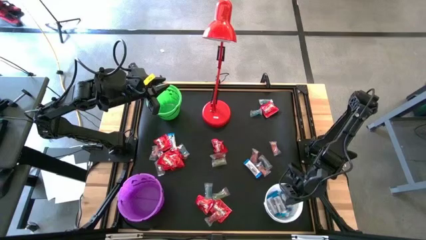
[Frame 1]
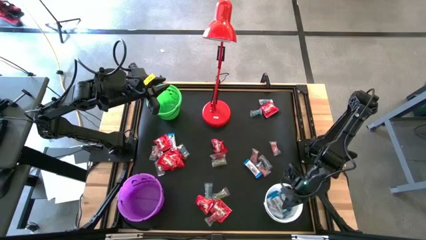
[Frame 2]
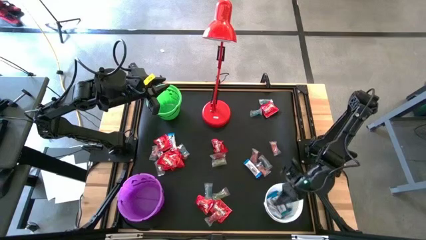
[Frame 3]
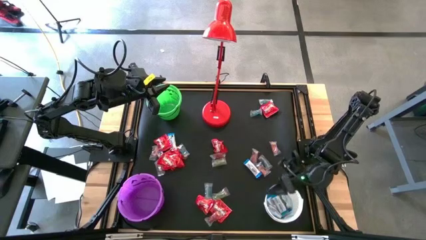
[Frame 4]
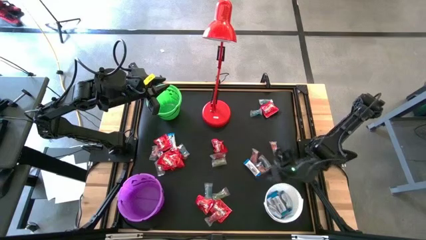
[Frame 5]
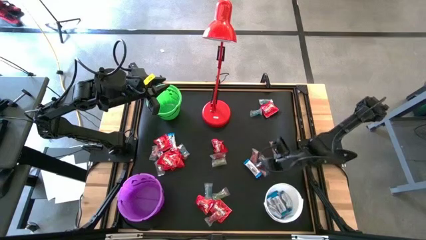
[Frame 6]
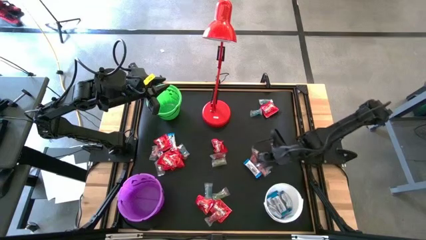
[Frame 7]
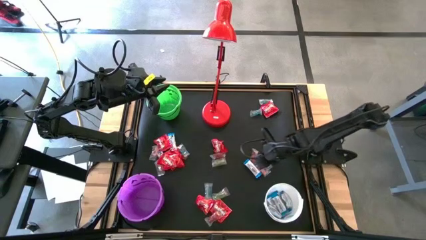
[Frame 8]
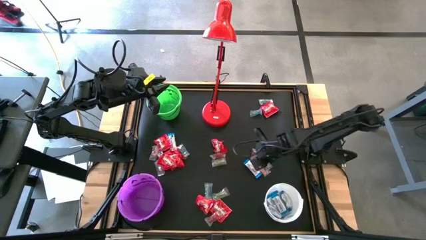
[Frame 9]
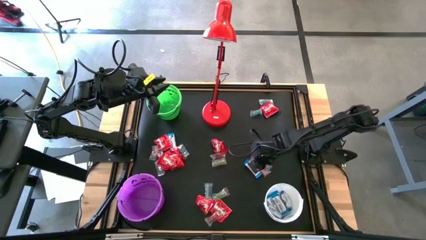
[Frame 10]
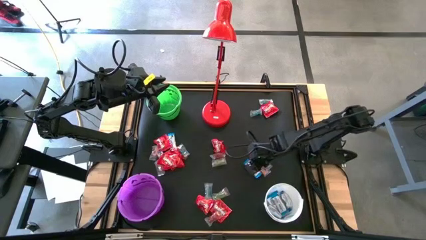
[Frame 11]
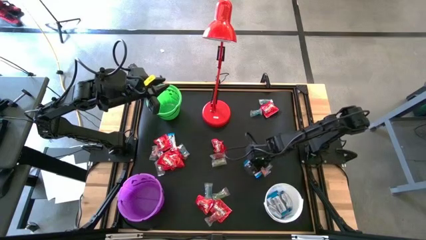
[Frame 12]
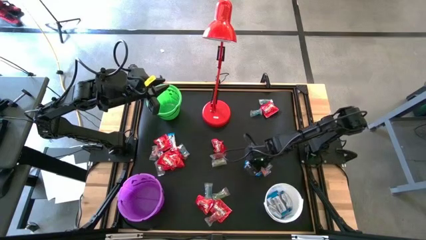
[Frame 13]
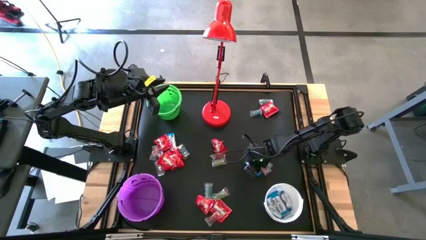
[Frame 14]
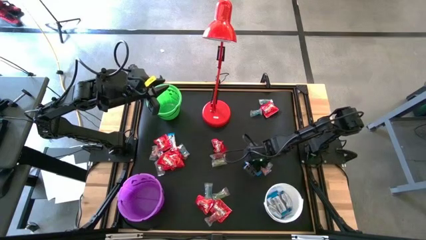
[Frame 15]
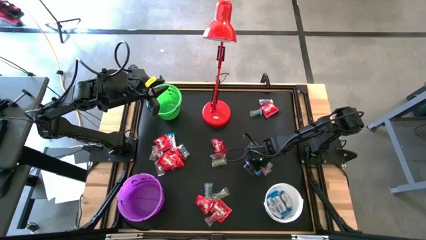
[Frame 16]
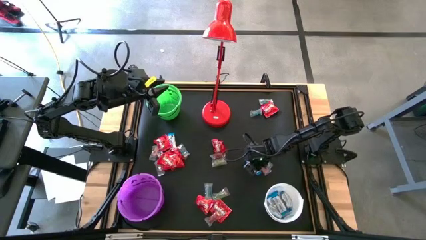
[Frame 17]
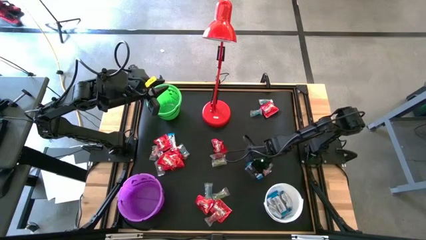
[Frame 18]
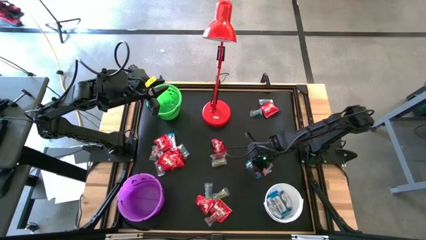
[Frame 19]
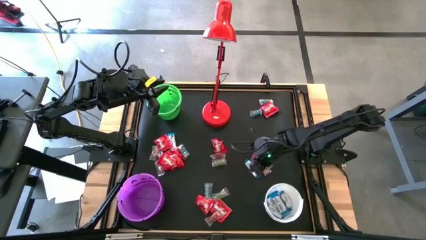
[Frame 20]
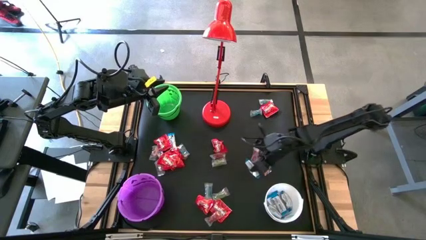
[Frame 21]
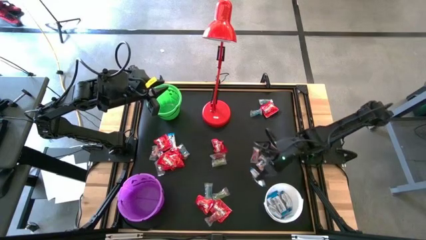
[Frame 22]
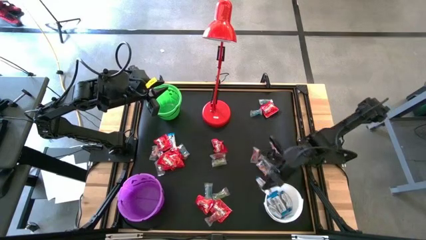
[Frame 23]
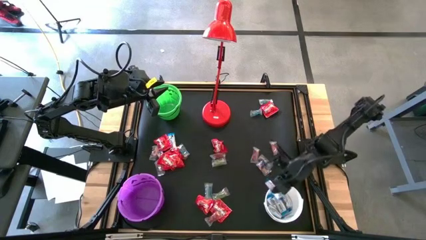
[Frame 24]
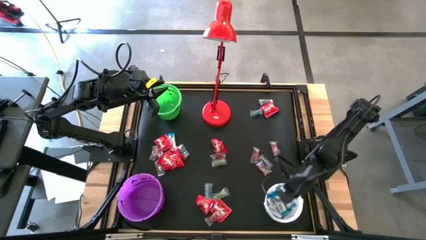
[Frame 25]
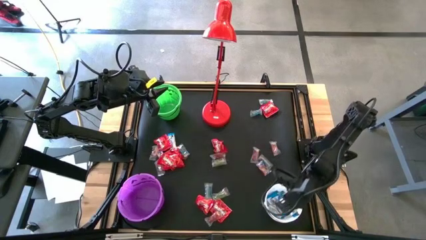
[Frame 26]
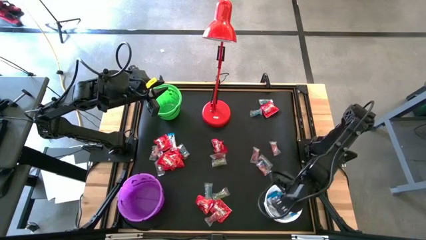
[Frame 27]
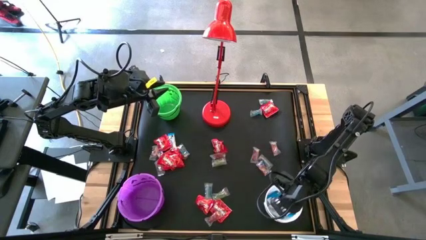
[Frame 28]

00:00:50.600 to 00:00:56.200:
Task: Sort candy
Put the white chocolate into the white bucket

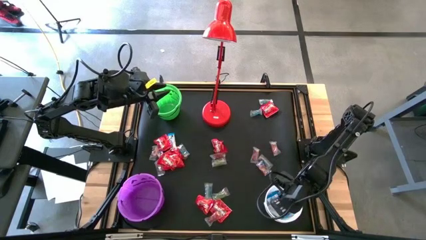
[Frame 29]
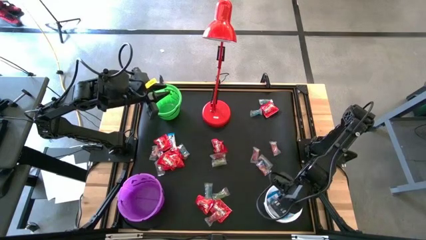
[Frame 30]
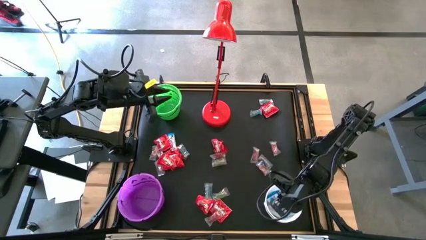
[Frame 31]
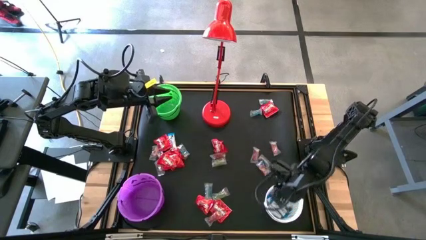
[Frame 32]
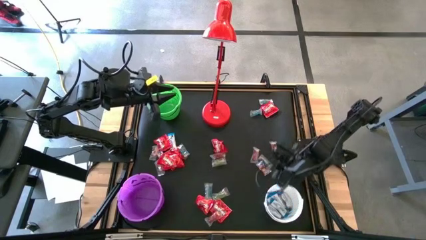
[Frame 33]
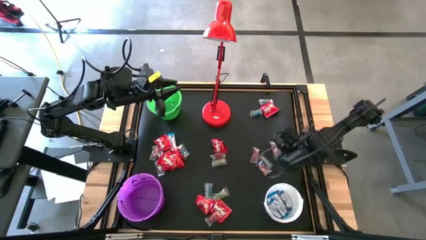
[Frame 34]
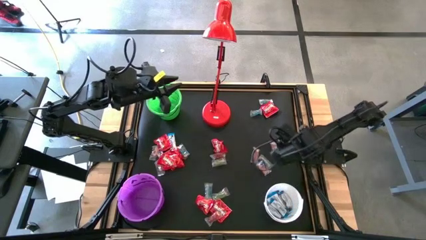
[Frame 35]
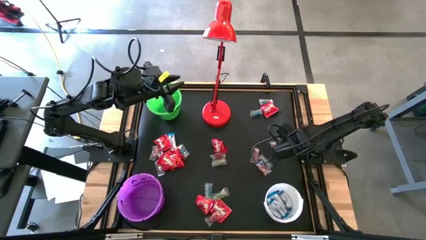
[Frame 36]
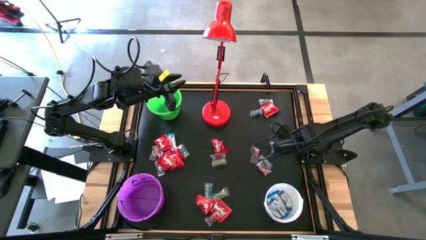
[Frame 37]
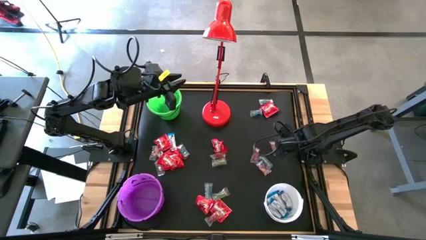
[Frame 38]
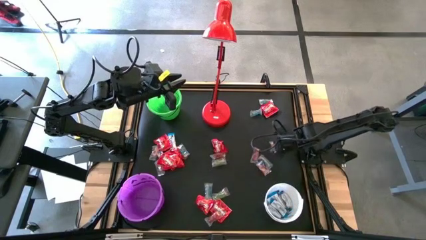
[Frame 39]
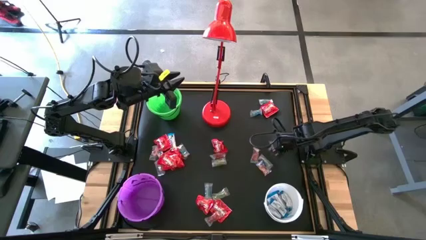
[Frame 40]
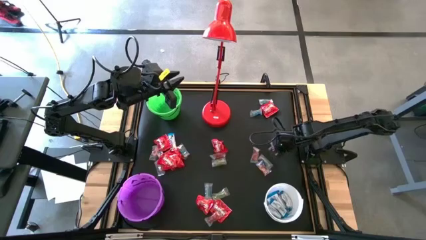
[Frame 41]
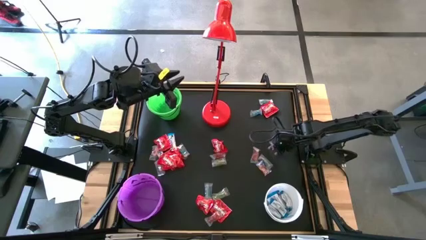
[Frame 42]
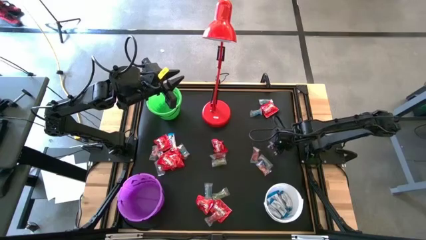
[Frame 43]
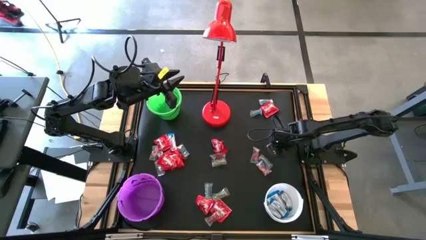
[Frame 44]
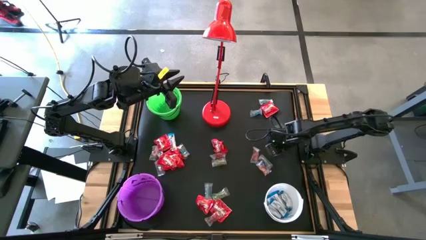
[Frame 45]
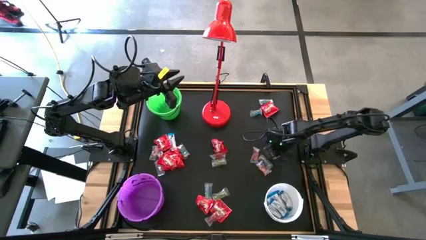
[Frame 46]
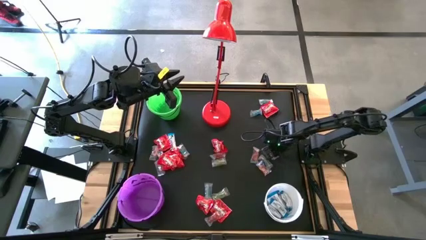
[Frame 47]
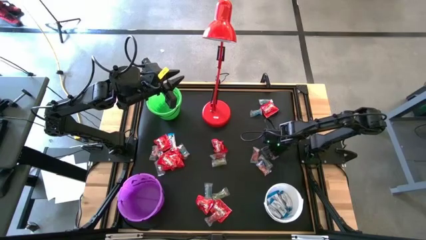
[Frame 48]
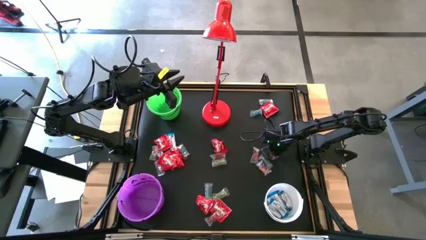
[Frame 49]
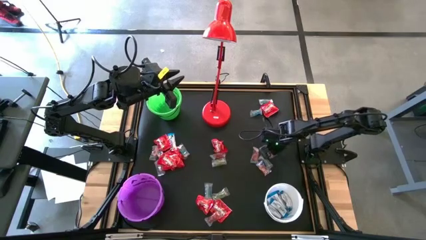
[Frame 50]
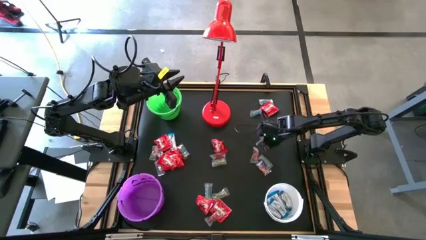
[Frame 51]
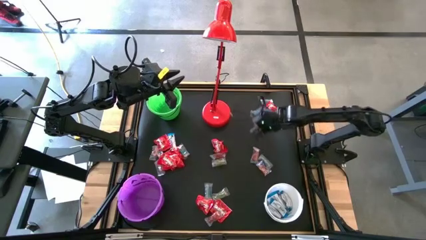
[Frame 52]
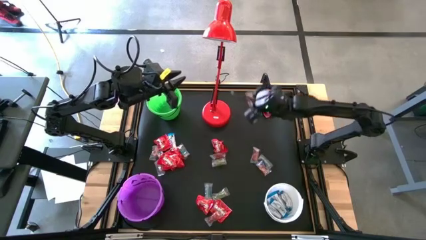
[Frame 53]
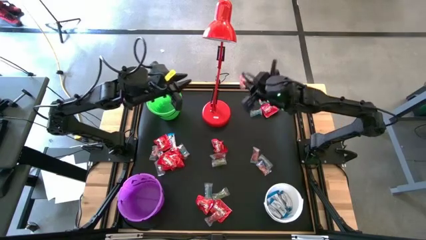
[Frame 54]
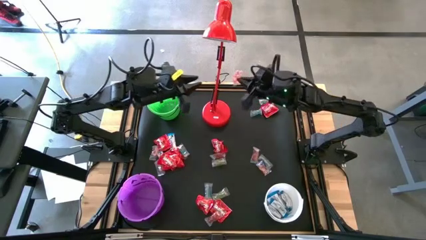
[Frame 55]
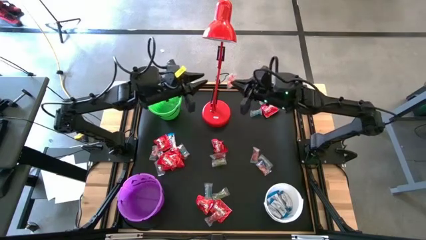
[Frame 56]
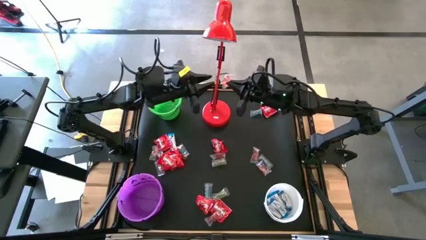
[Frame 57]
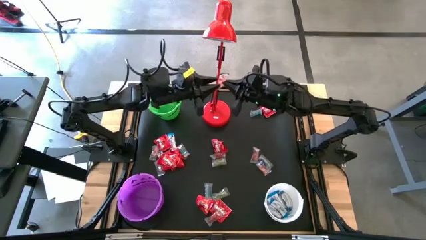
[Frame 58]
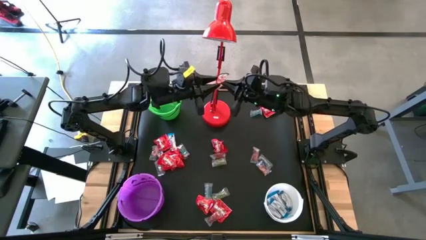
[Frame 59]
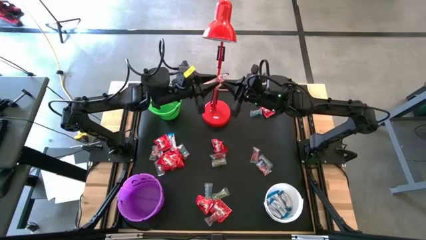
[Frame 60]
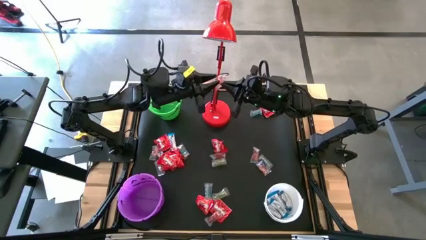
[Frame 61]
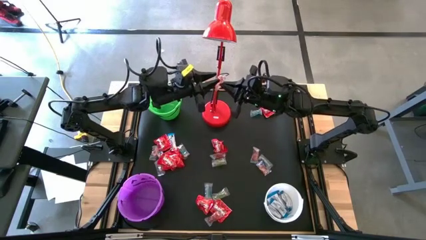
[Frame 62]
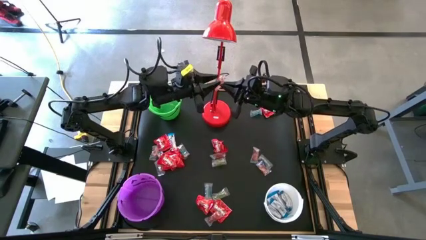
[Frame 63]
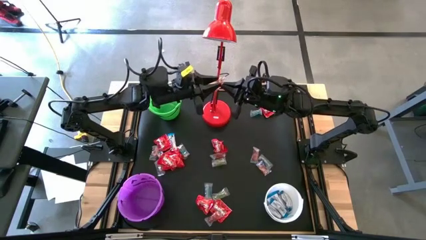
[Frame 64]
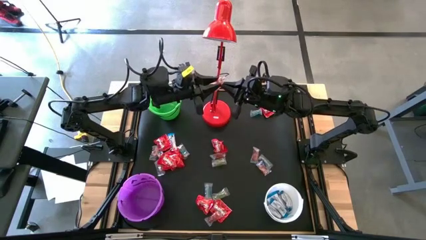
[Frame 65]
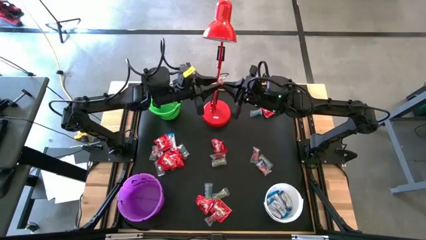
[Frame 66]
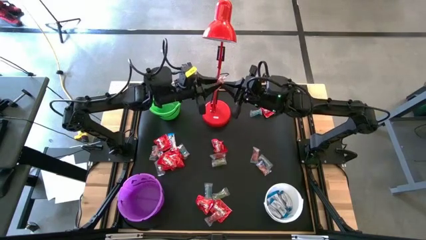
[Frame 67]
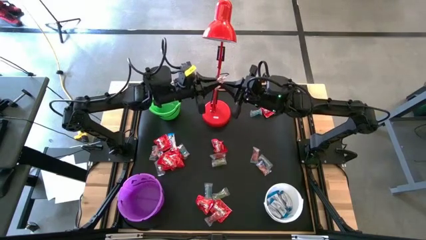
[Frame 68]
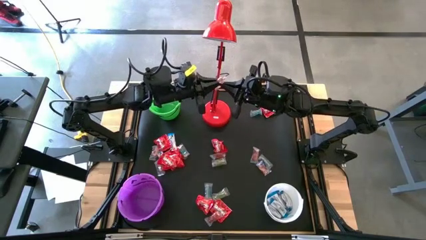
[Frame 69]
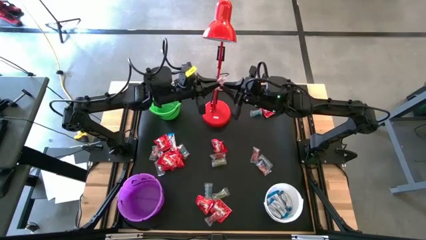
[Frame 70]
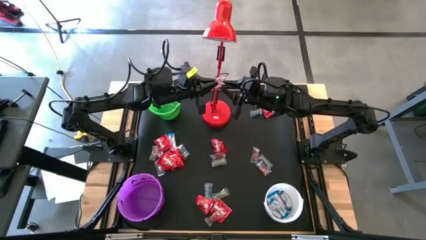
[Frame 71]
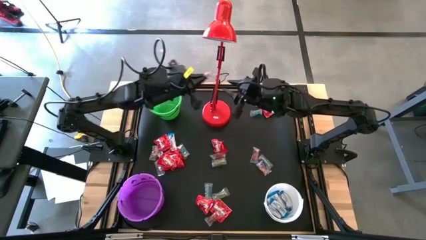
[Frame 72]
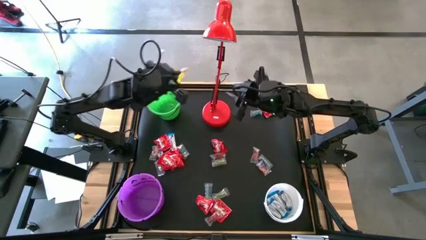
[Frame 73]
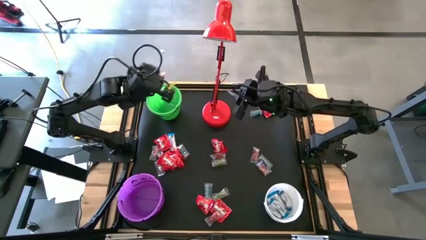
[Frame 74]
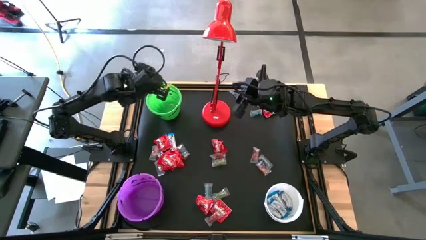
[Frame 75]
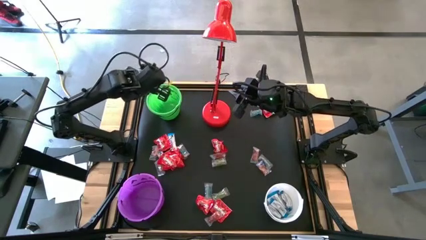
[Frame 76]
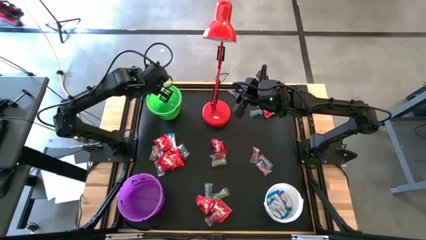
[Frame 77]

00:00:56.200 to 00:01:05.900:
Put the orange gummy into the green bucket
